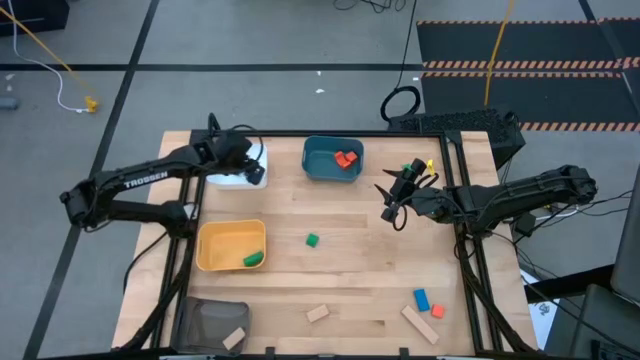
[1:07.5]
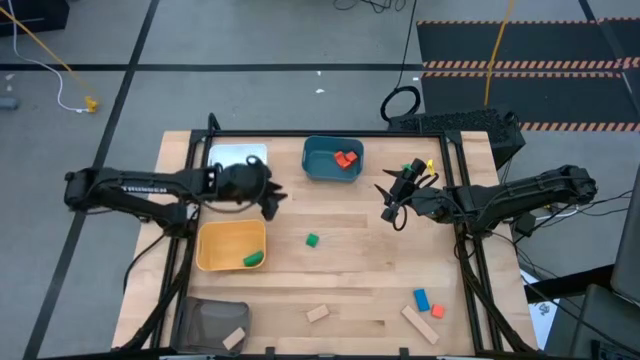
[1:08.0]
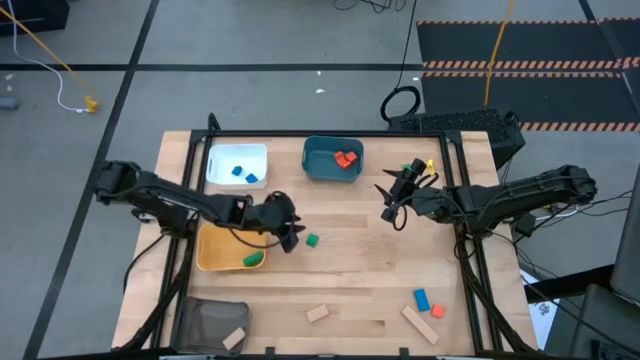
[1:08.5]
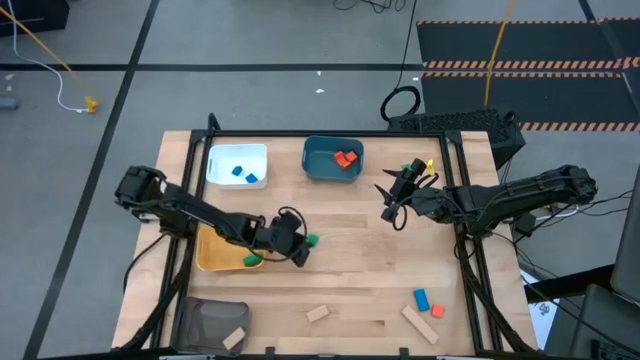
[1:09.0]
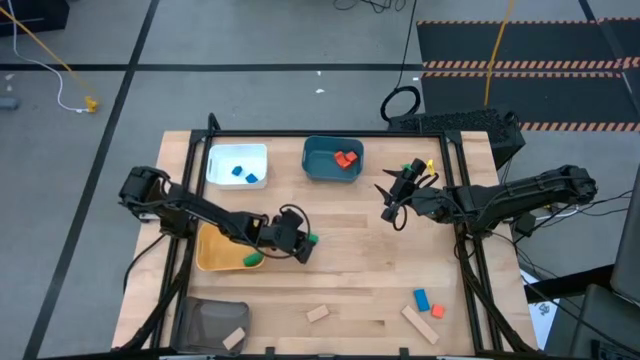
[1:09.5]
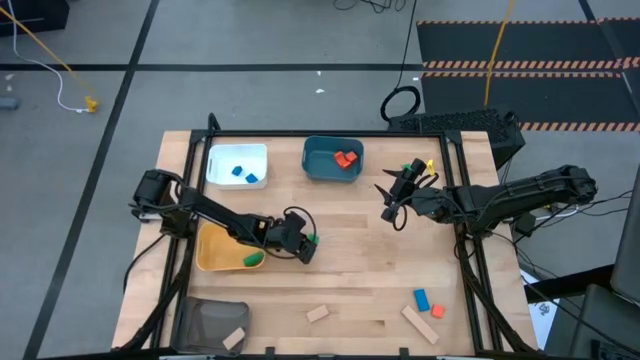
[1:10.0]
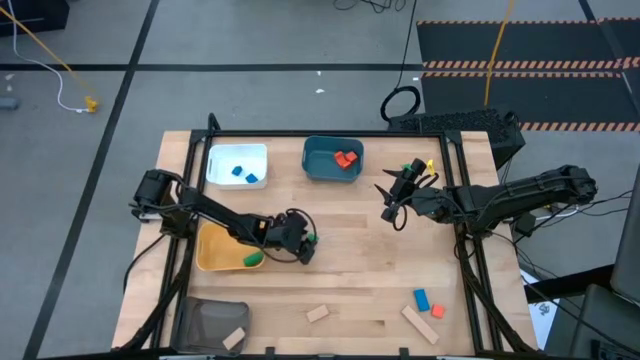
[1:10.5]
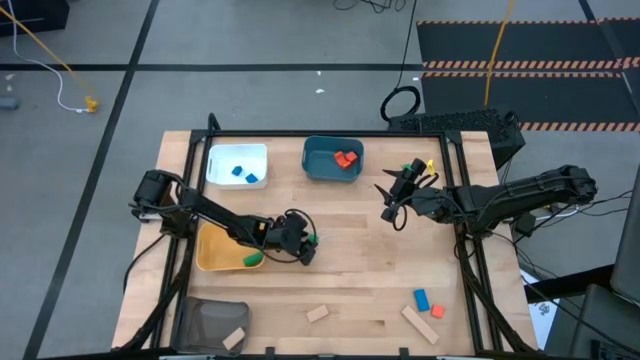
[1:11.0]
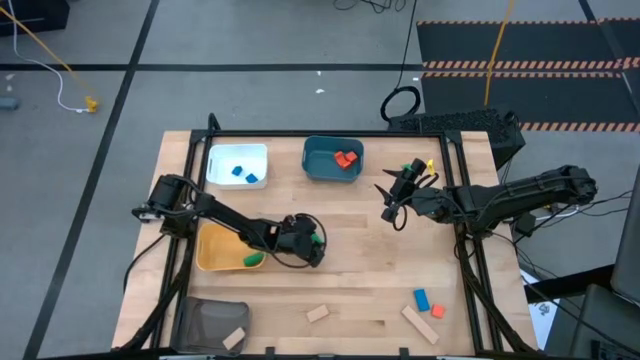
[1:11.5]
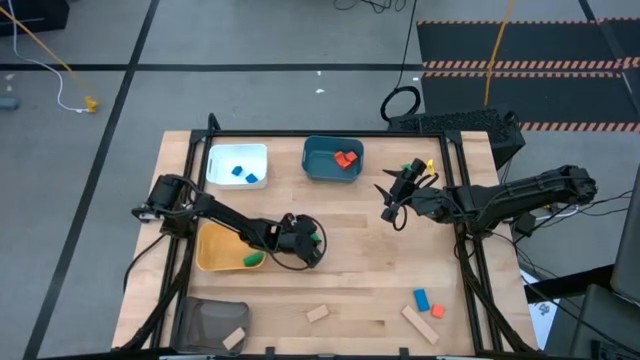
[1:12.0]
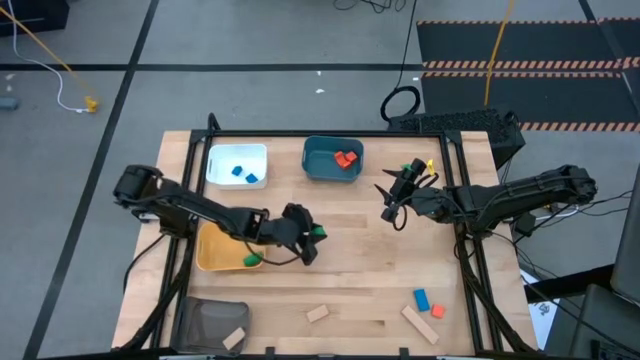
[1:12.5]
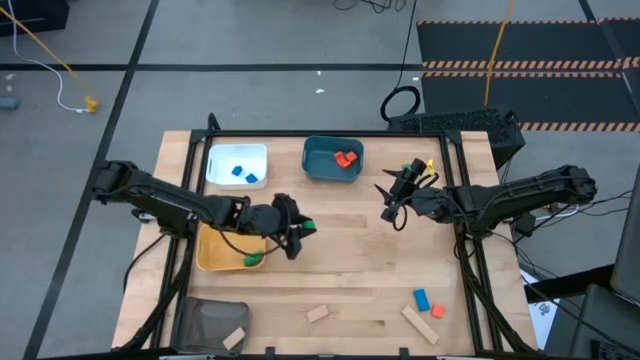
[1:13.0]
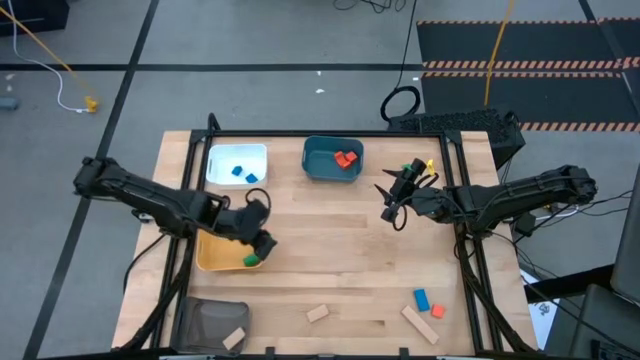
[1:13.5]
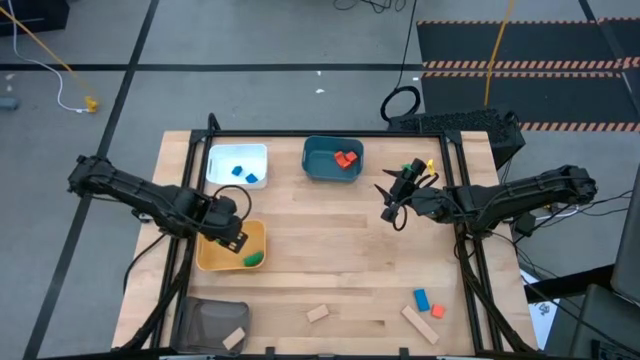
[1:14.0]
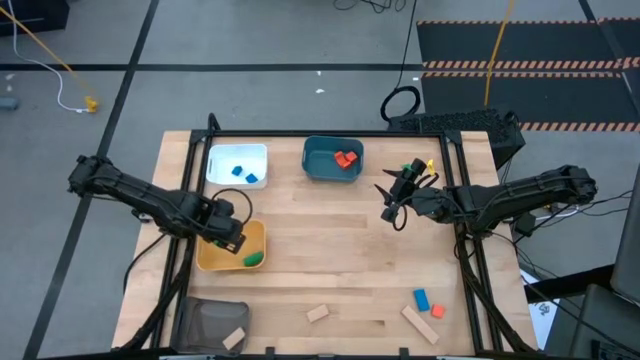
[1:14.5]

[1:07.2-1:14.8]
Task: Sort & place blocks by color
Put the bottom green wooden block into the yellow bin

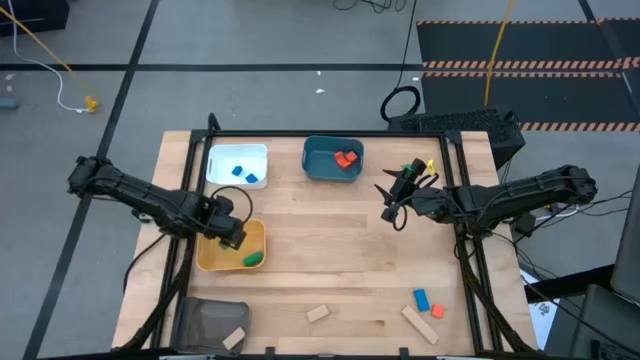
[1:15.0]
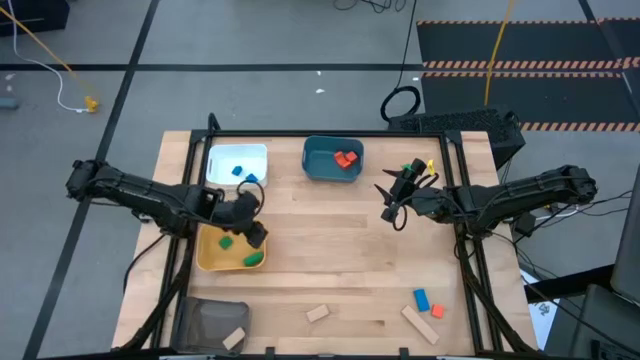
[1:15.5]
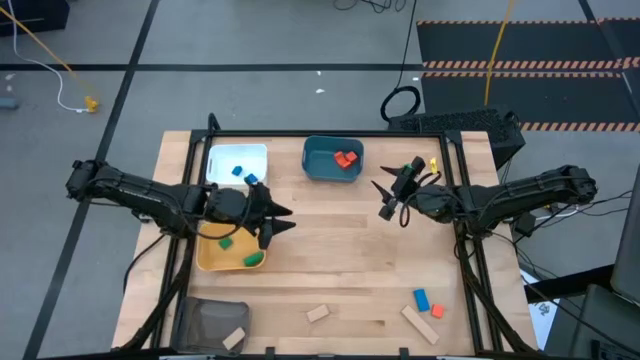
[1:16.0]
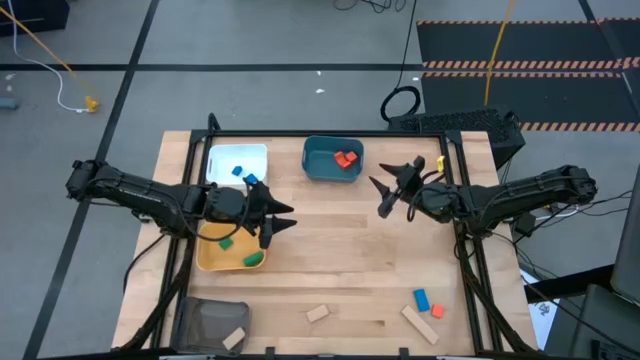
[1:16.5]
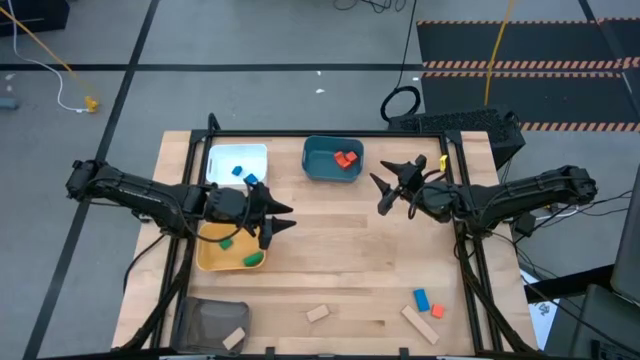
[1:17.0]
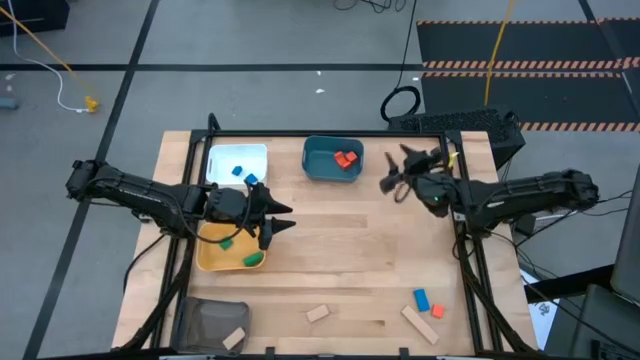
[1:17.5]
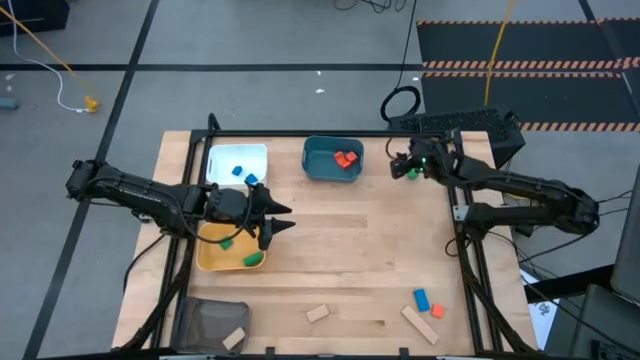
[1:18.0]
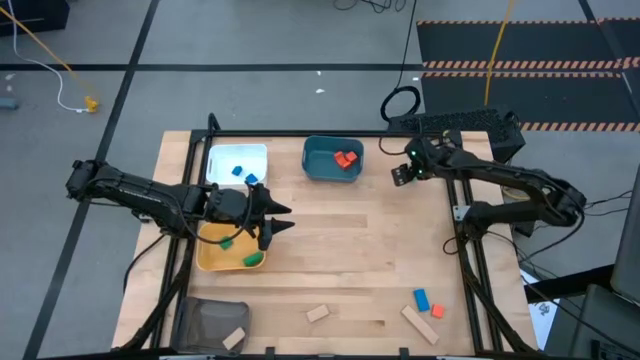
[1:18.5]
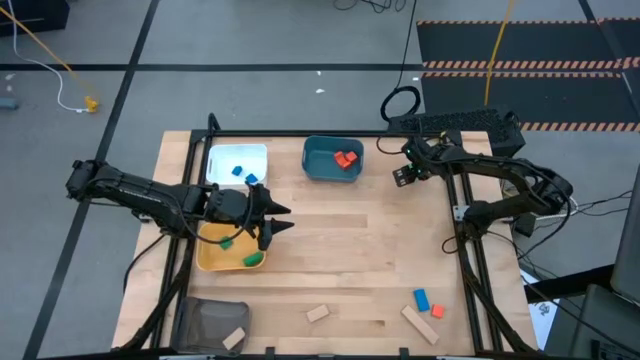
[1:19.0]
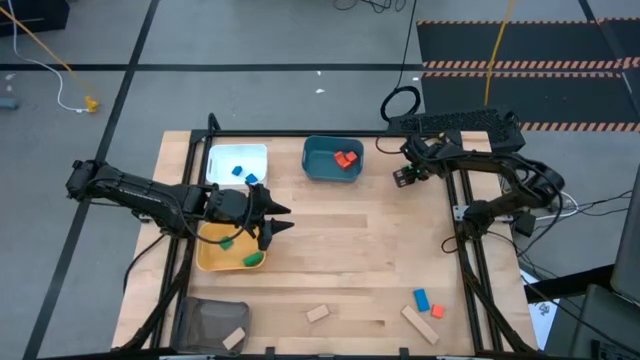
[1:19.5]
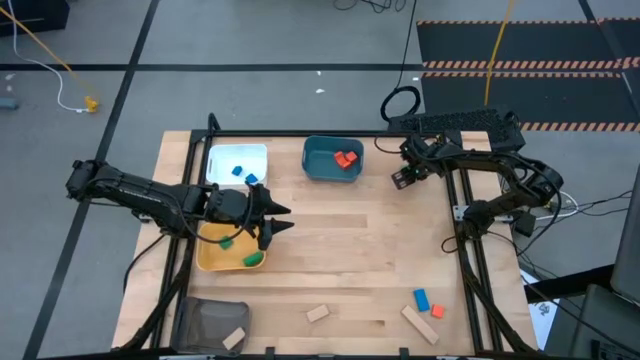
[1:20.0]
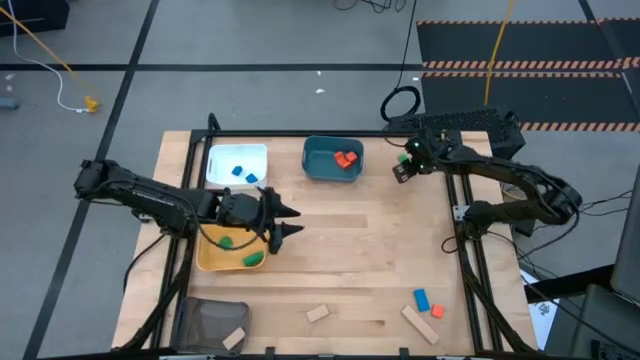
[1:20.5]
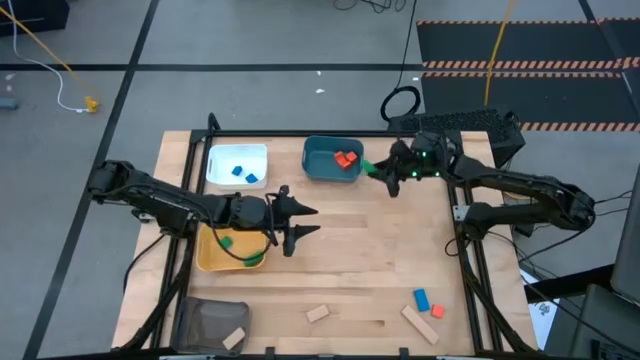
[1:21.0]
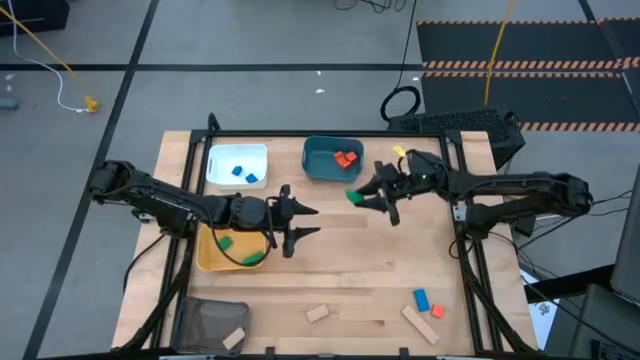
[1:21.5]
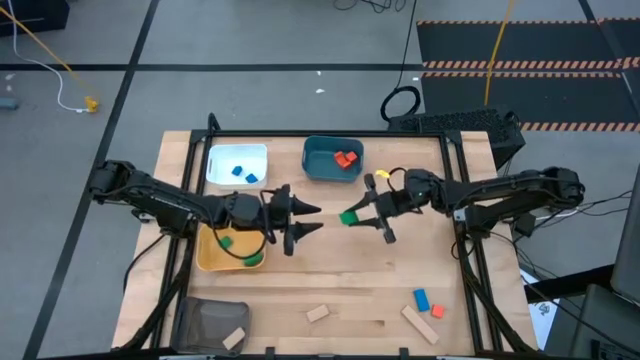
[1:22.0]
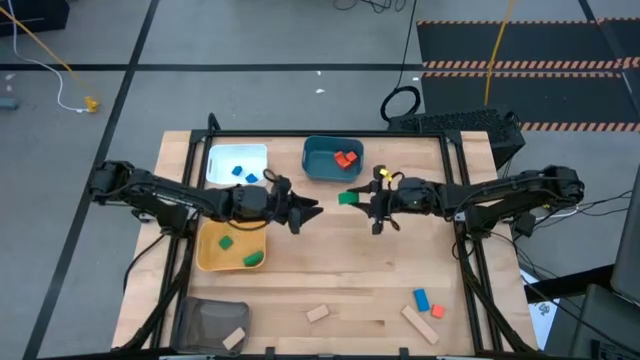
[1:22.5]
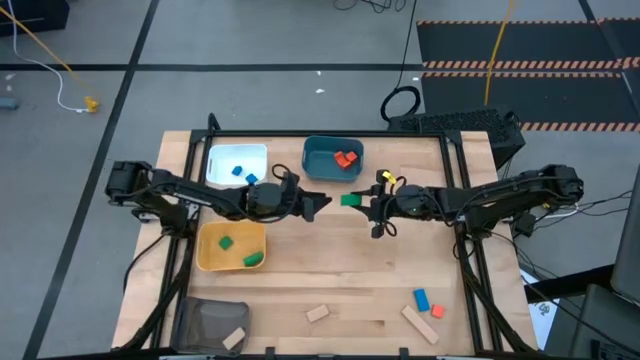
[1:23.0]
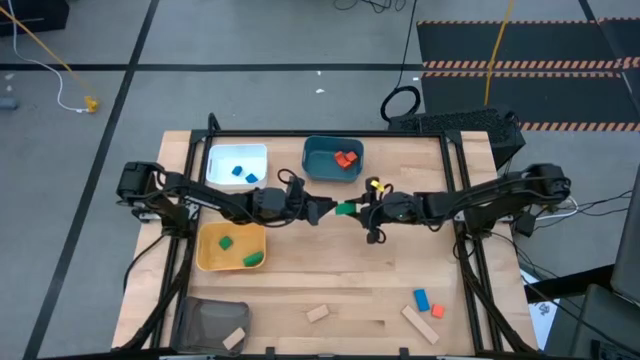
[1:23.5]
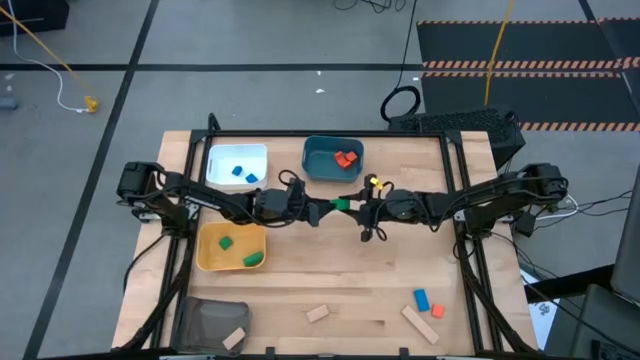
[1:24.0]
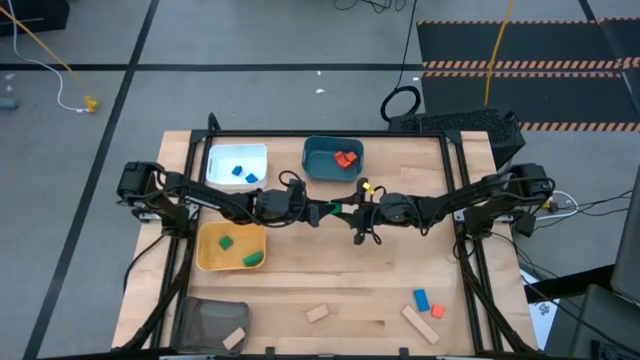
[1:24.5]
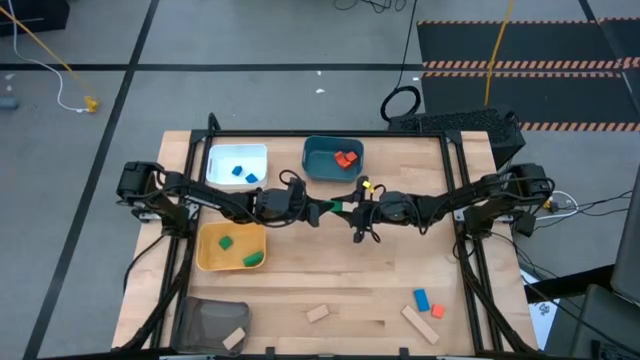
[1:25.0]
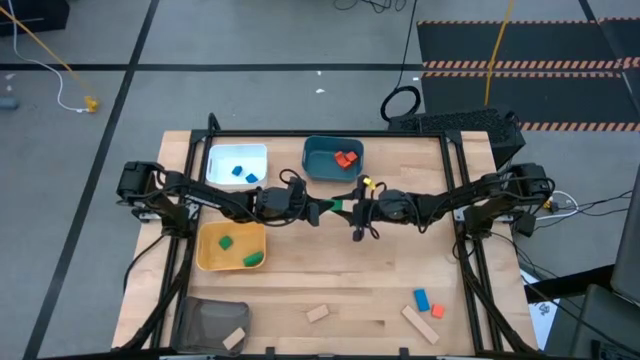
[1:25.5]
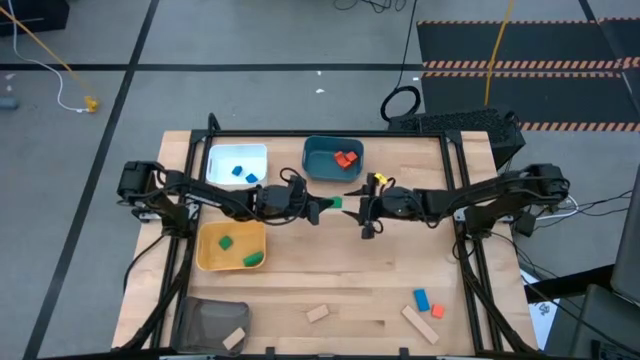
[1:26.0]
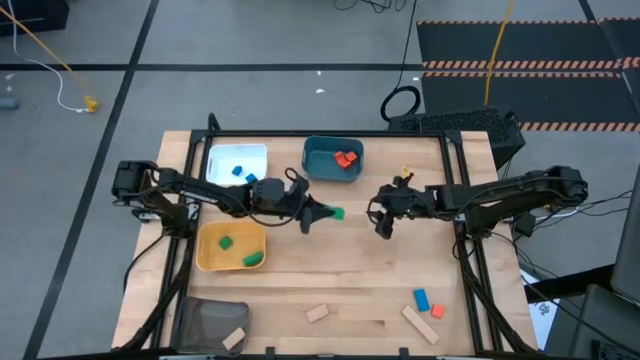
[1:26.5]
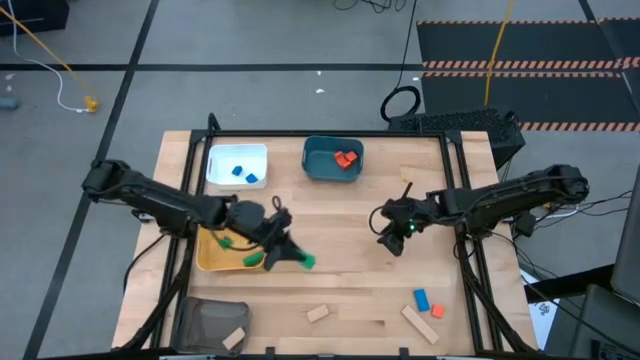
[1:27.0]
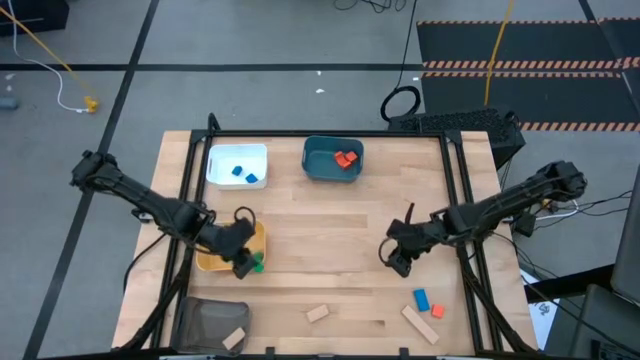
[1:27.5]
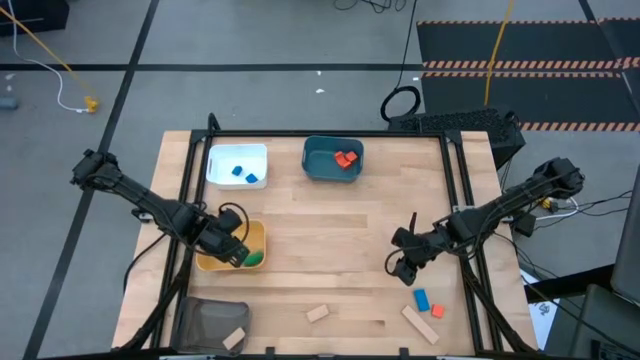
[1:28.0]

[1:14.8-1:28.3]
Put the green block wooden into the yellow bin
